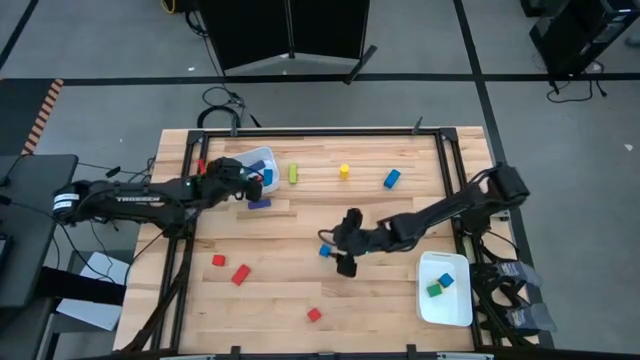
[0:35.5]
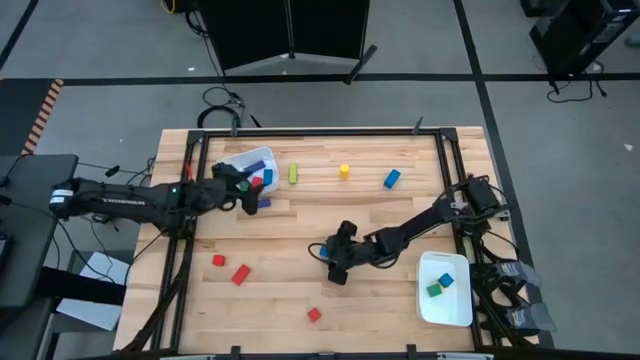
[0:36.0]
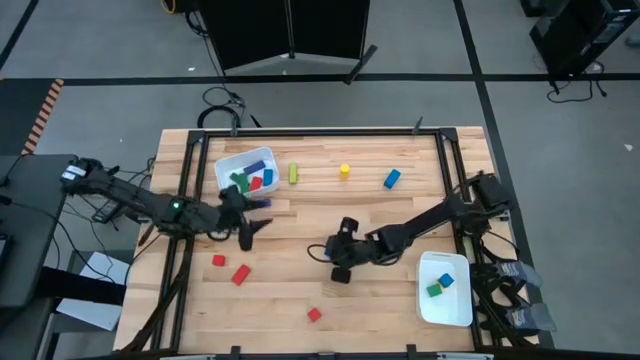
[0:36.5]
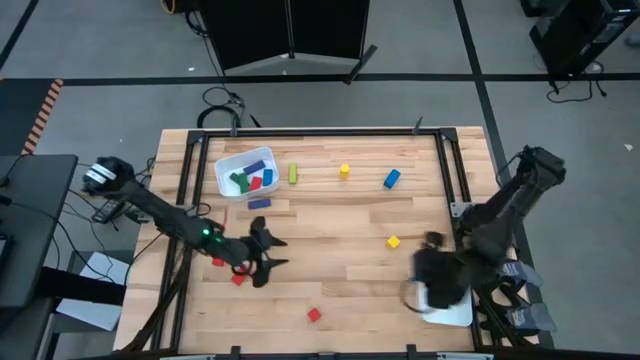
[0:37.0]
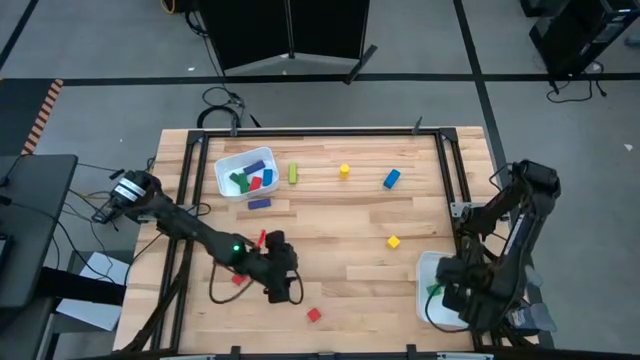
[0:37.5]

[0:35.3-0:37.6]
Task: Sort blocks by size
Put the small blue block into the bottom white bin

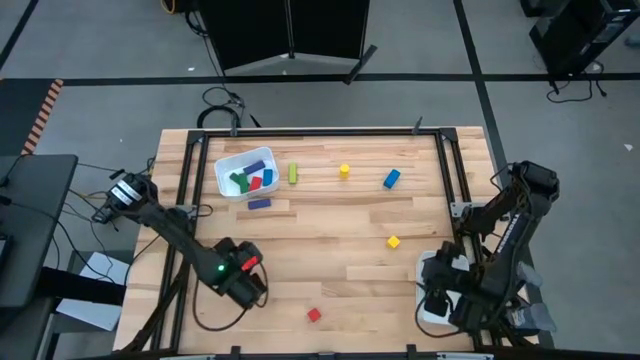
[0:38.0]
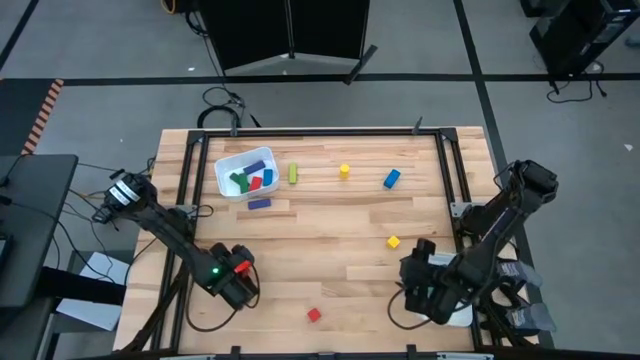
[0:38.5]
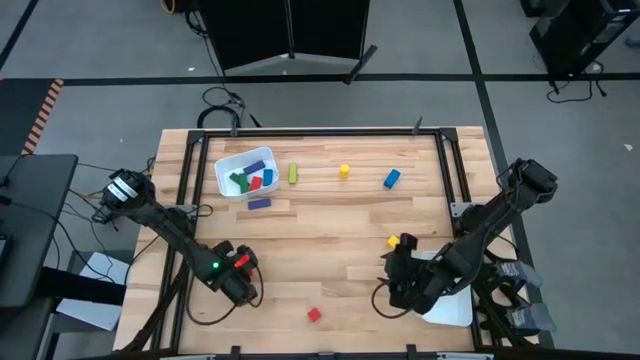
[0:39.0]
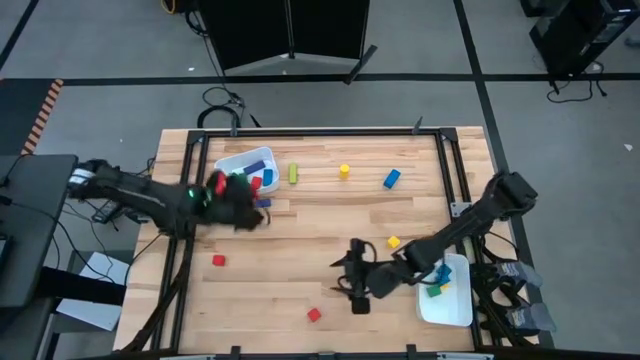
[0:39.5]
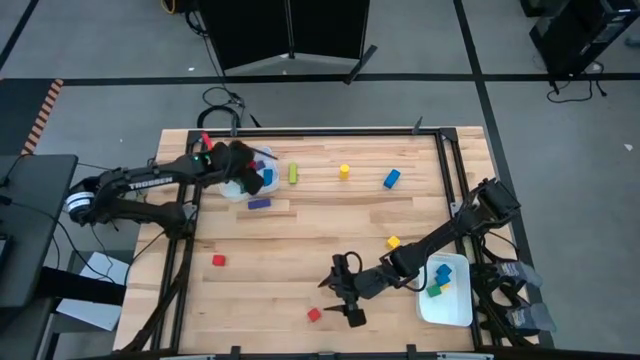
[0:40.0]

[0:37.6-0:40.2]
Put the large red block into the top white bin

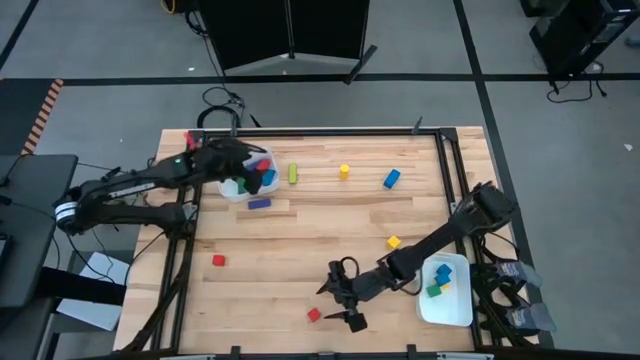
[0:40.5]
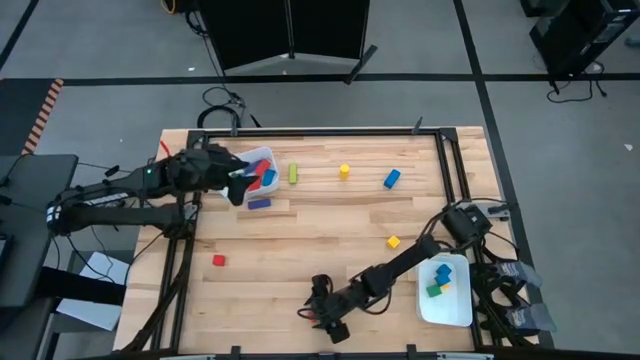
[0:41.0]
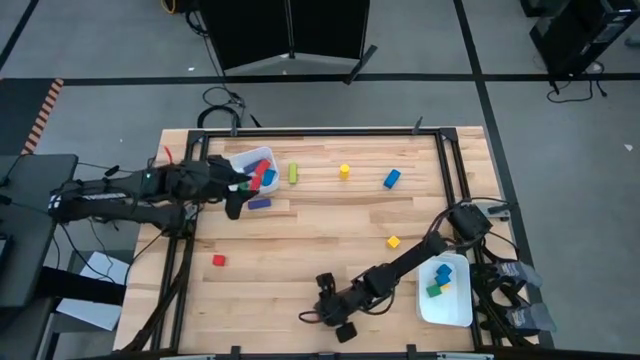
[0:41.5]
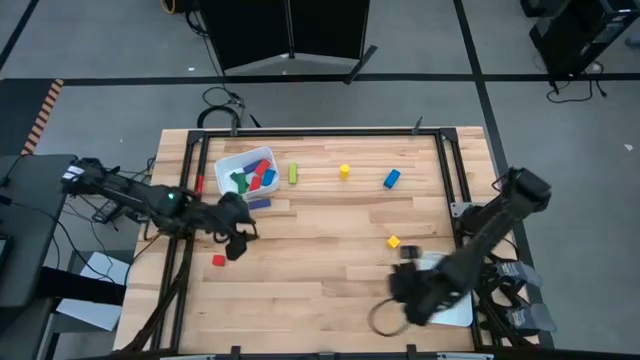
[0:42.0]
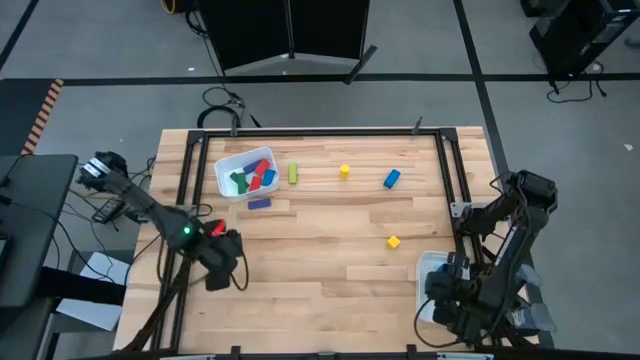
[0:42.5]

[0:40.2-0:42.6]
Put the small red block into the bottom white bin

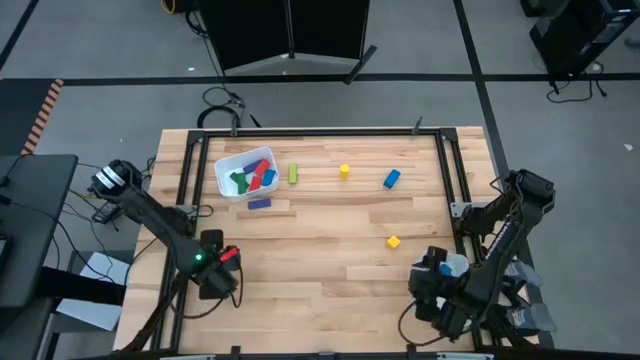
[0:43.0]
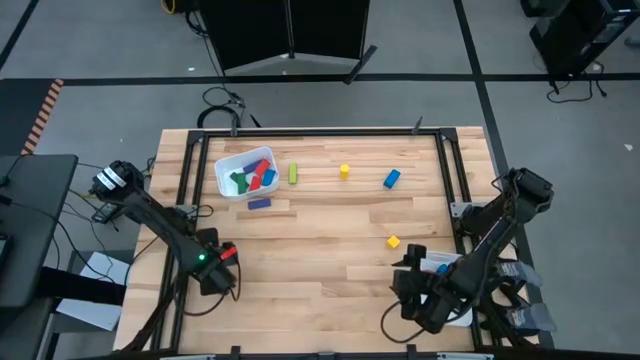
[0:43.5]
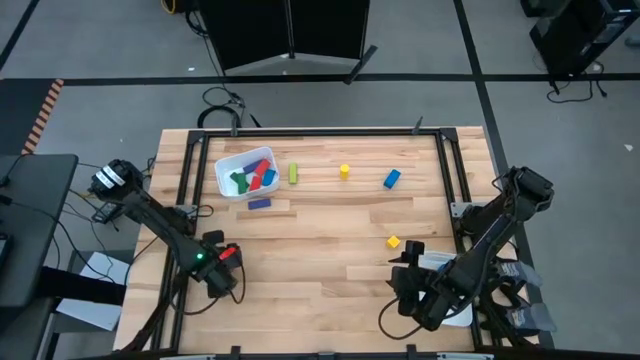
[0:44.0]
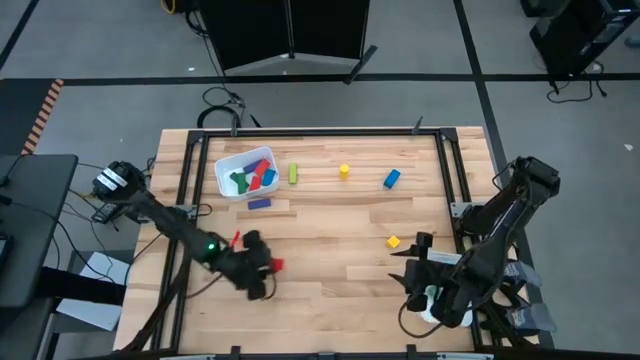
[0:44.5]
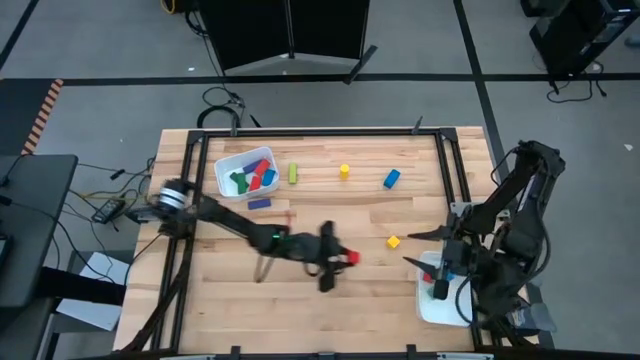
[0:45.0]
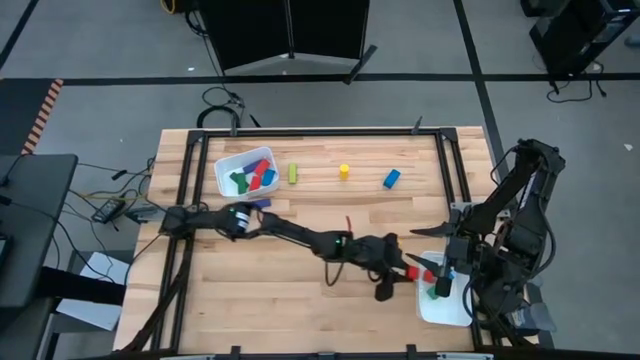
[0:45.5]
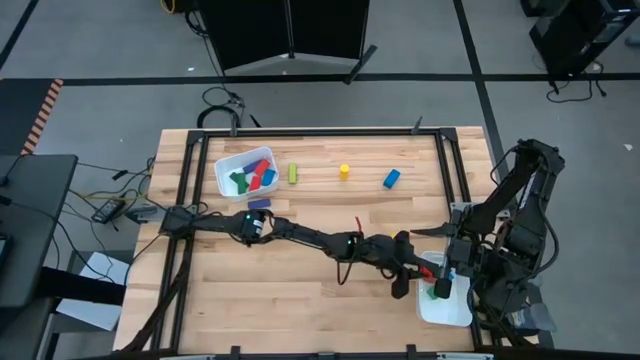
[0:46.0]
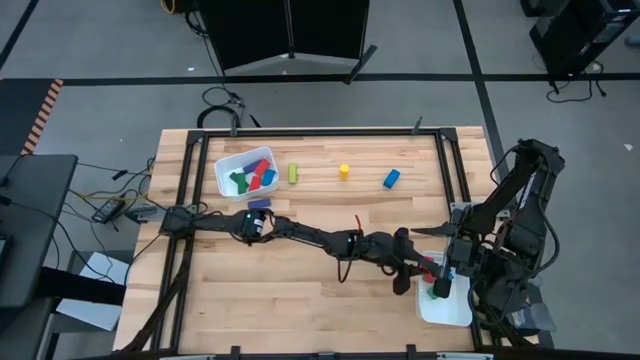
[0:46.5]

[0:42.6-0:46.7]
Put the small red block into the bottom white bin

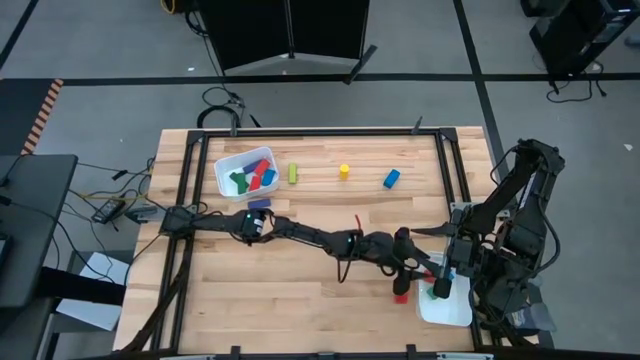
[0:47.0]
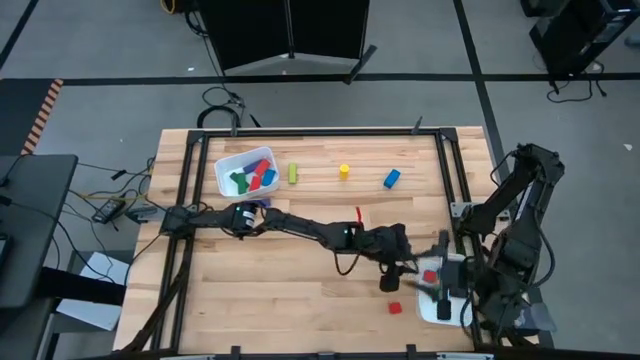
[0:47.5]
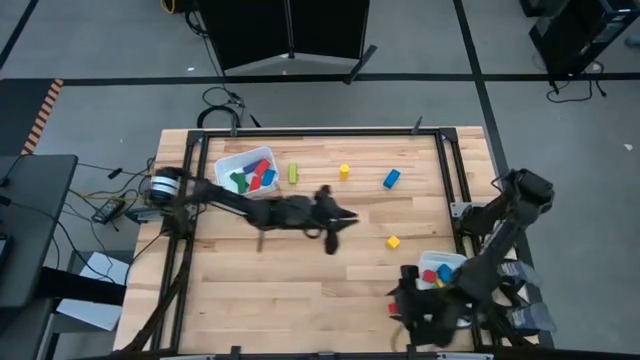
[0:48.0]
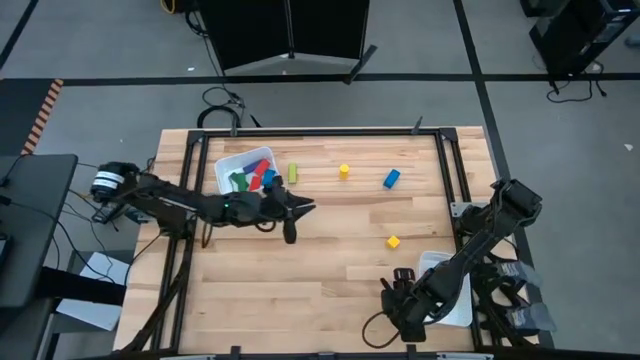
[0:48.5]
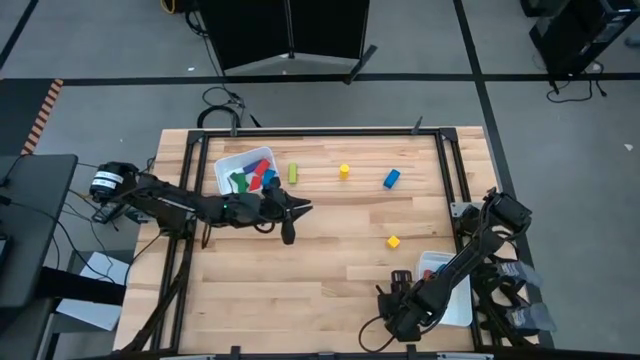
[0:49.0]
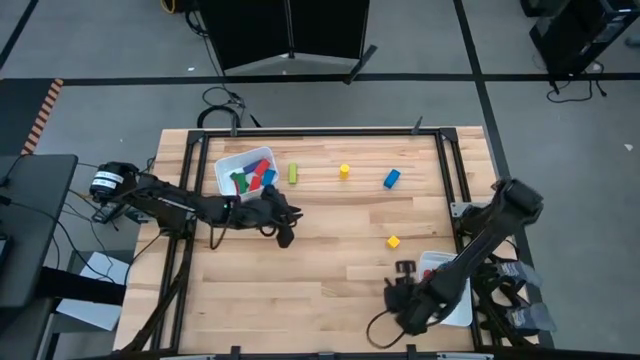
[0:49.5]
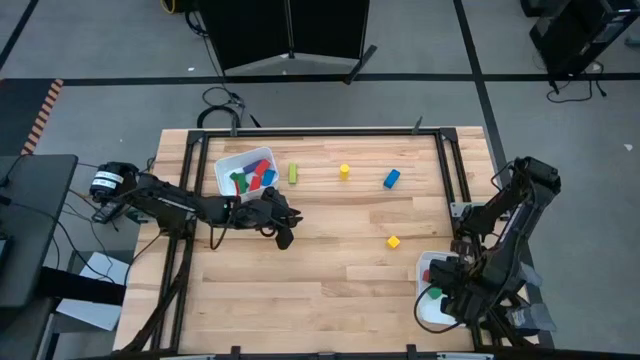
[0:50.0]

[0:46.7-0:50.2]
Put the small red block into the bottom white bin

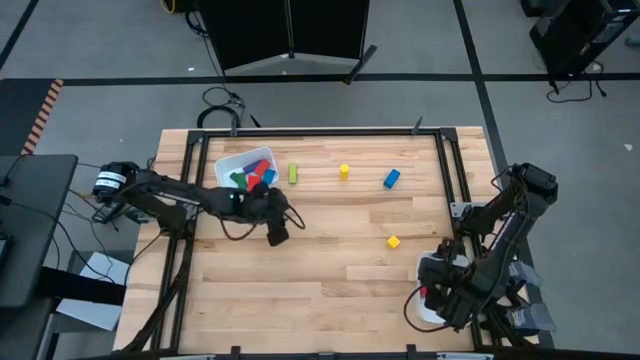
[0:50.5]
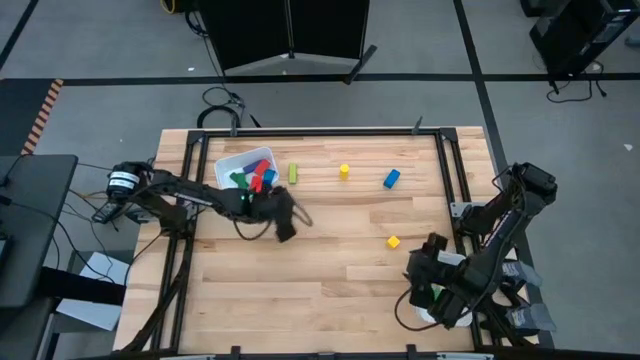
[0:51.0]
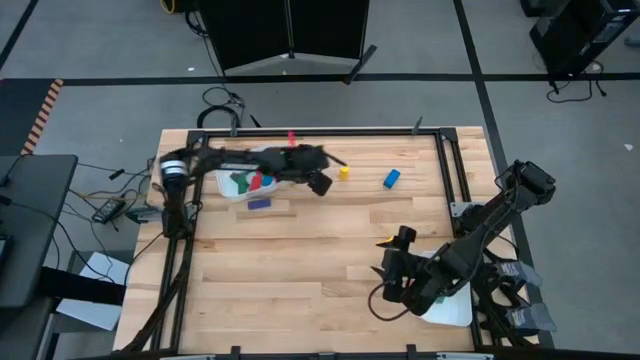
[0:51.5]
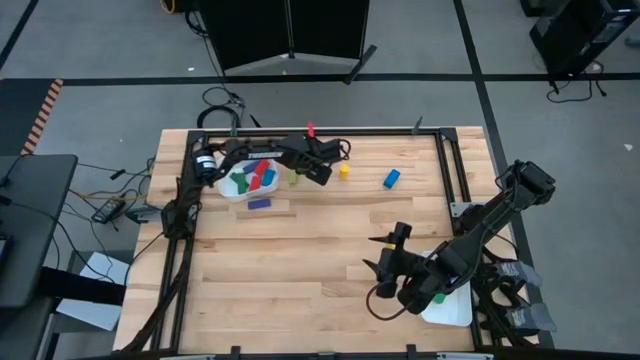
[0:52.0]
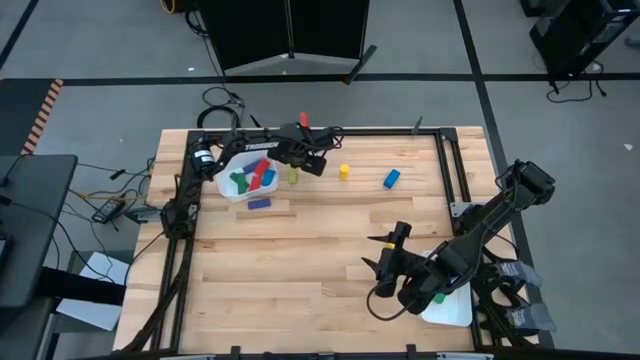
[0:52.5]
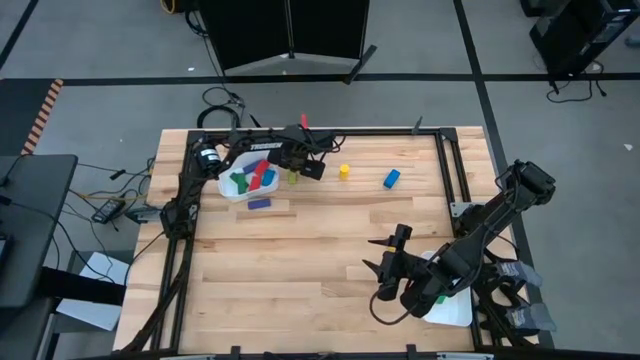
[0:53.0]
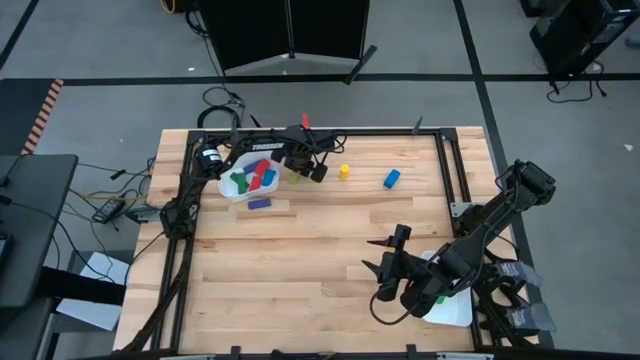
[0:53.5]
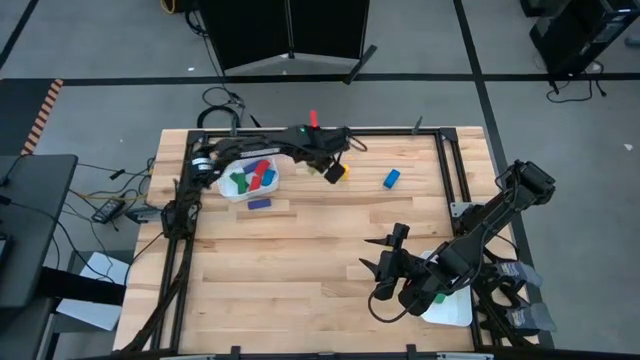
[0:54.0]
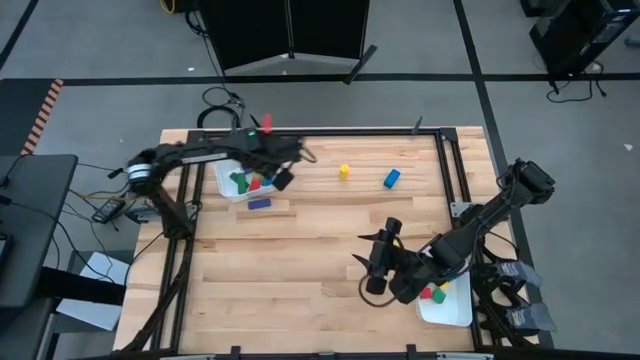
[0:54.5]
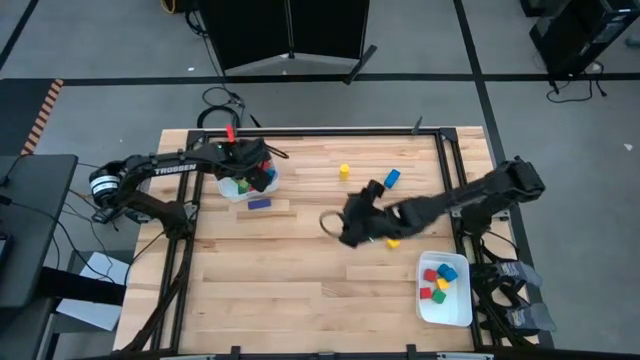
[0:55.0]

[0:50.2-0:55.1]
Put the large green block into the top white bin

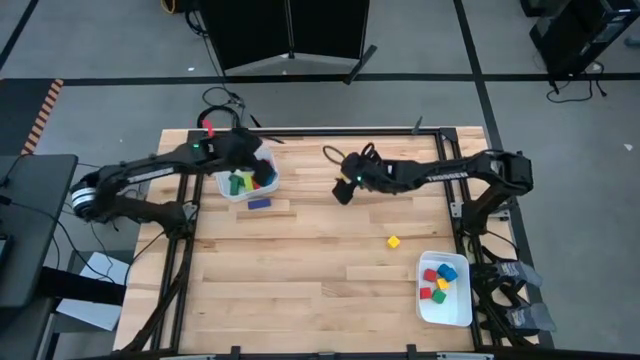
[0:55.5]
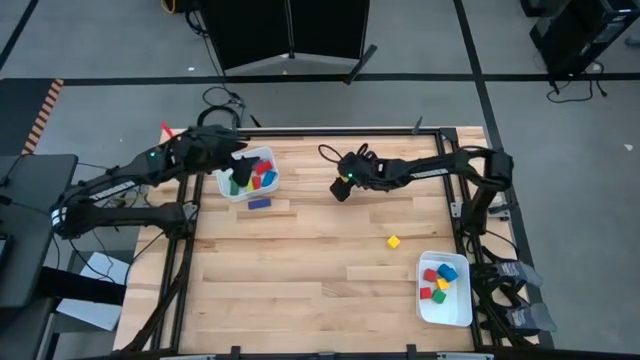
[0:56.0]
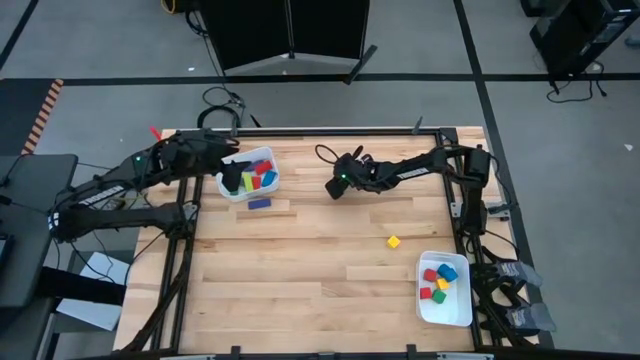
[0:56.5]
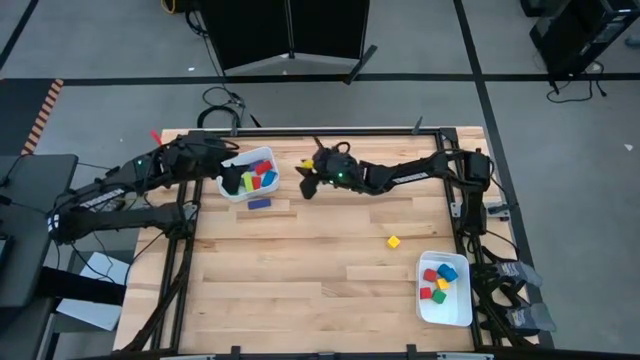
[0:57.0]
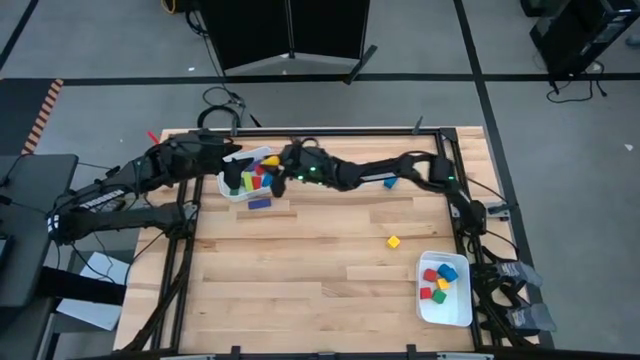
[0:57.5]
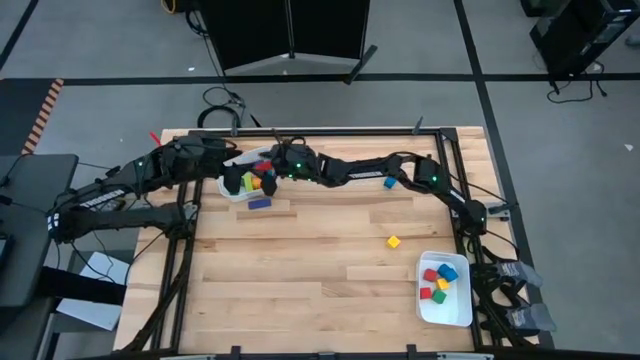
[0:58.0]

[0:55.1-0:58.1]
Put the large yellow block into the top white bin
